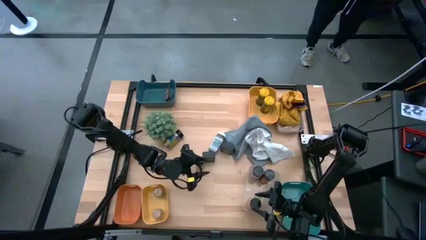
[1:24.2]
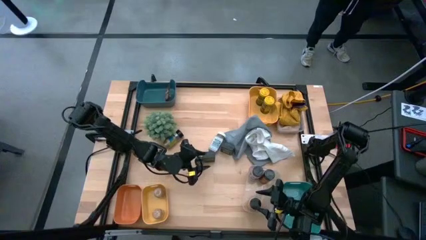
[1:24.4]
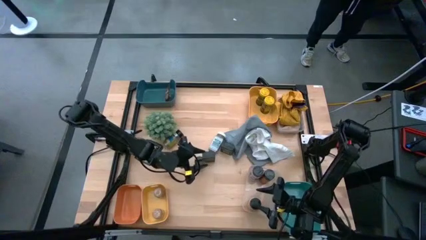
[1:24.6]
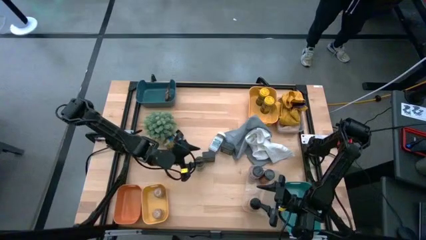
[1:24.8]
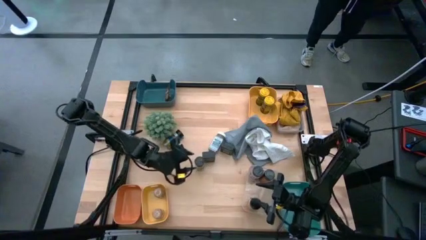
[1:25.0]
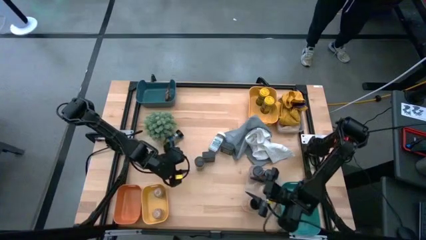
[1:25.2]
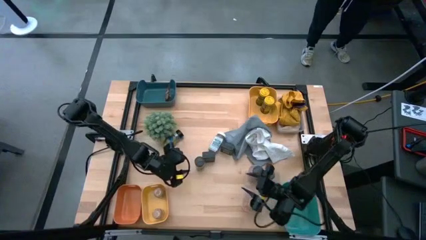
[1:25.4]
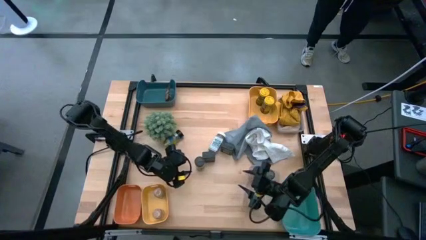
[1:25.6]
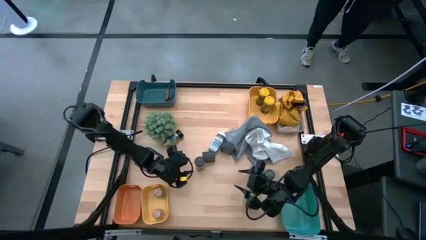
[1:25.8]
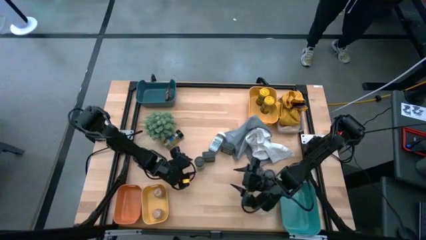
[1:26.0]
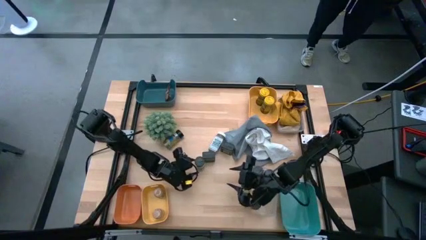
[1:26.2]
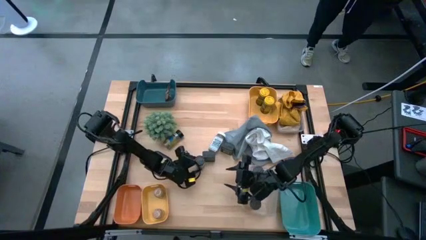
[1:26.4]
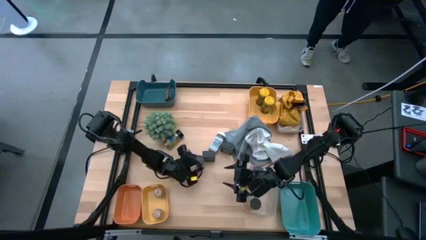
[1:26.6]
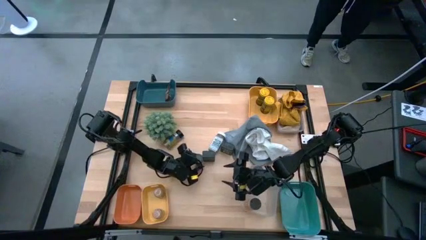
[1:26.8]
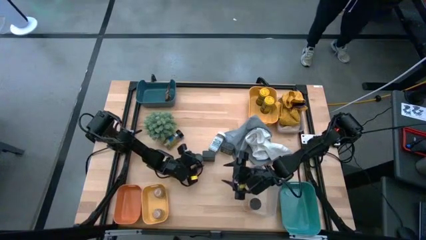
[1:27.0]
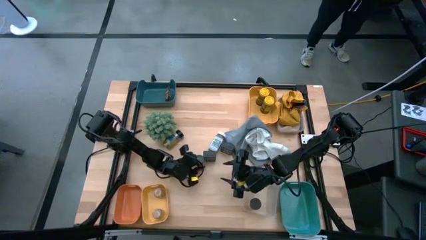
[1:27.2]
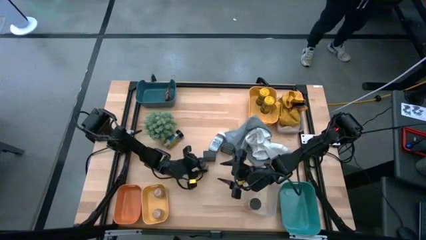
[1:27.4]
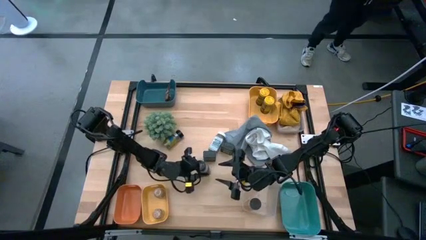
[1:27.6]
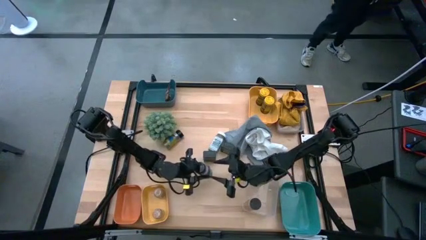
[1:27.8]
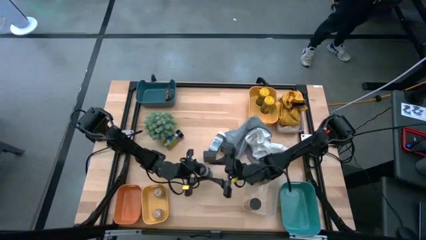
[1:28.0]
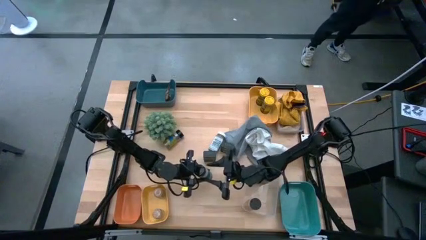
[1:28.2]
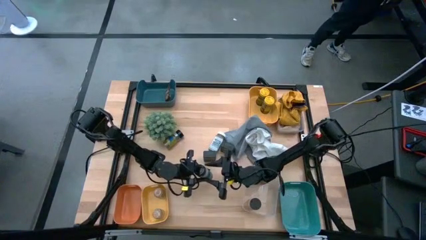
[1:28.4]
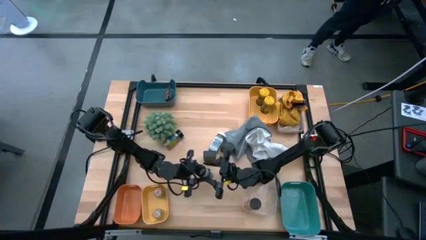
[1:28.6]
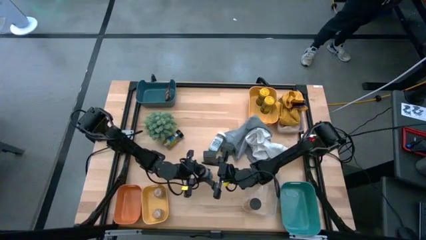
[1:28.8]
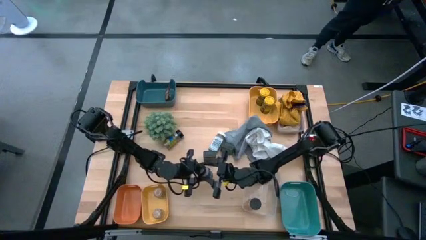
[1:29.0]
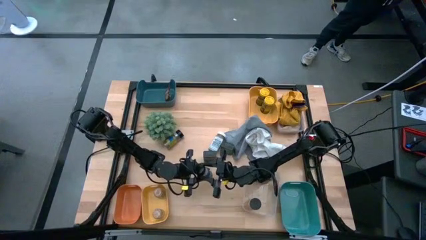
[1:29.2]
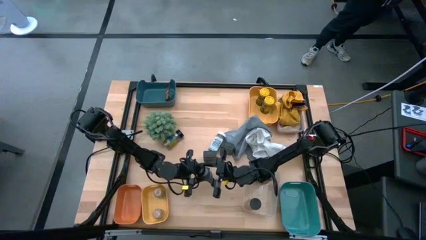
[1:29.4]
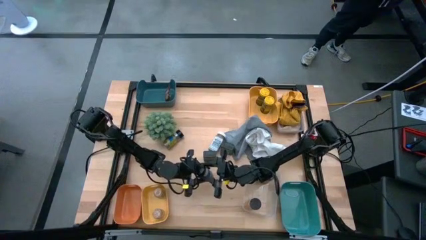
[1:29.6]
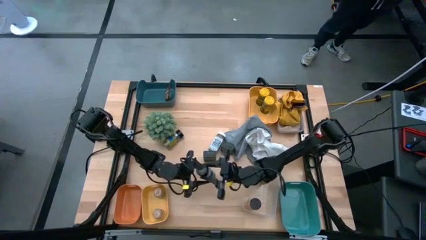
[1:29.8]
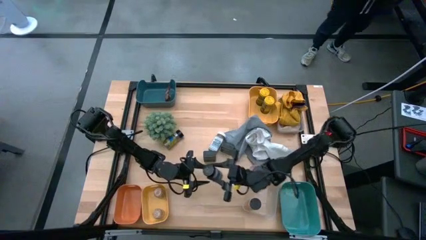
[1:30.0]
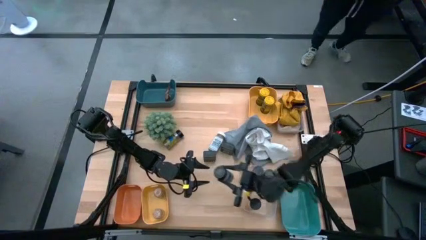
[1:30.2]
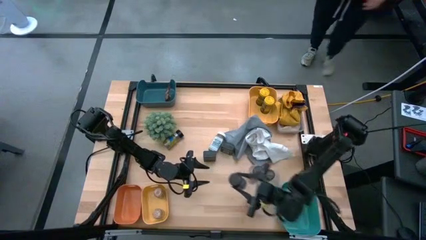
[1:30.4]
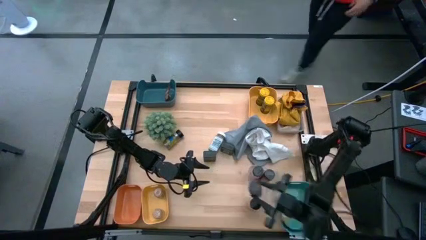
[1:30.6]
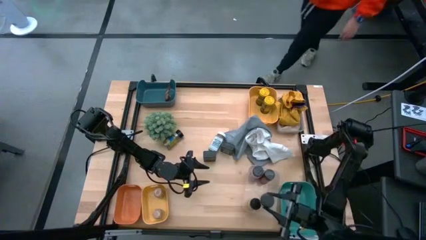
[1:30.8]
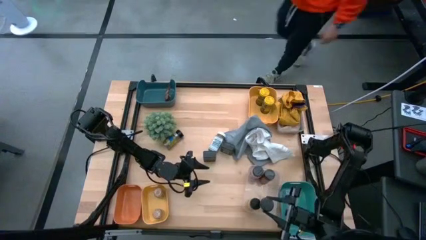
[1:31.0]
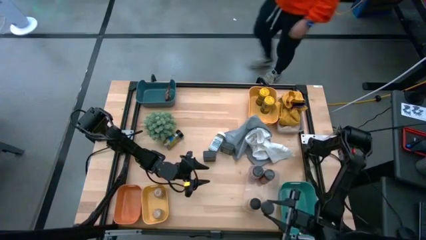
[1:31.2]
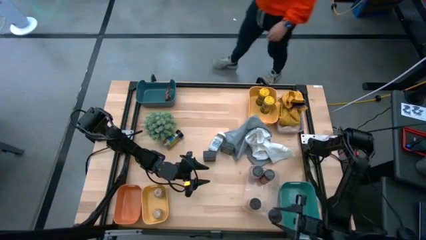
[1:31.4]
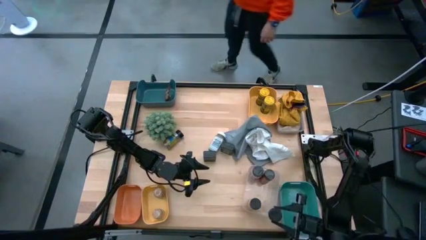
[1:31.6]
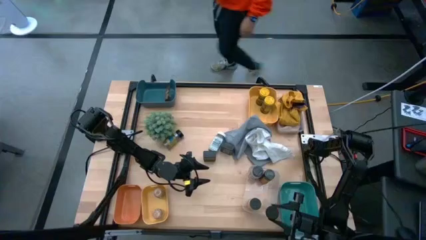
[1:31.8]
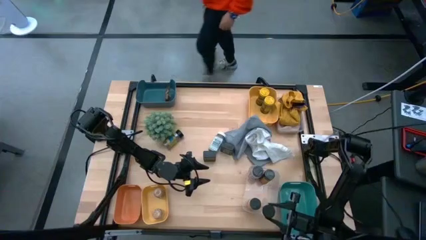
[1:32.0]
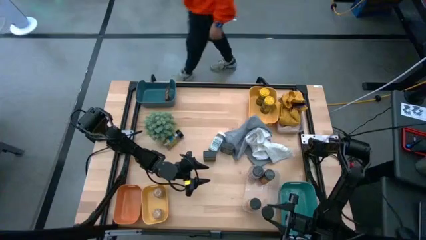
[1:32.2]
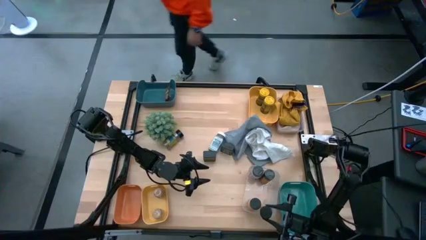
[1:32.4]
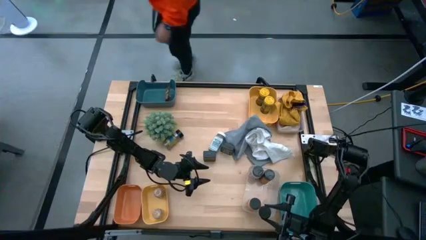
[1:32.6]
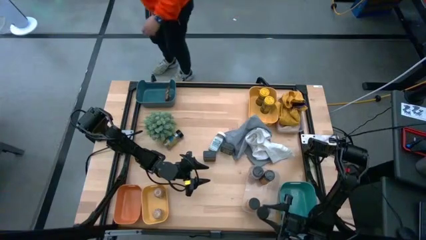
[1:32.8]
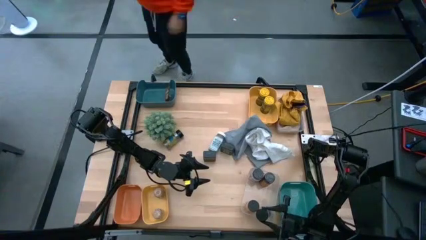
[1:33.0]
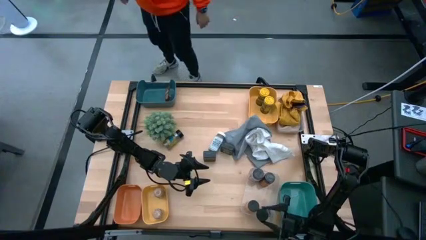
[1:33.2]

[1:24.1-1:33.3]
Task: Sort spices by type
Put the black seasoning bottle into the transparent bin

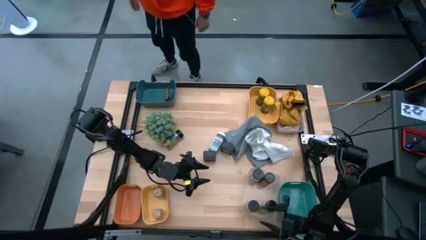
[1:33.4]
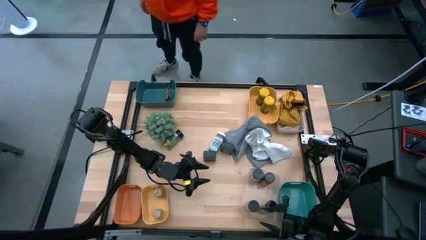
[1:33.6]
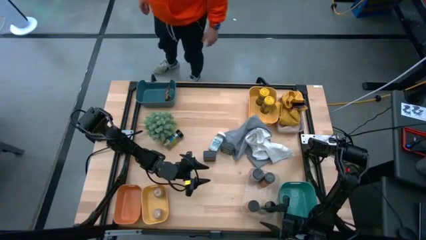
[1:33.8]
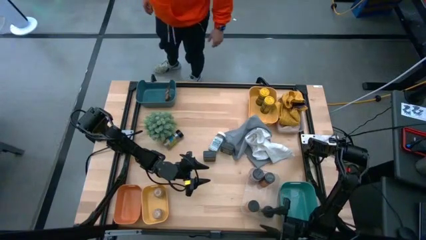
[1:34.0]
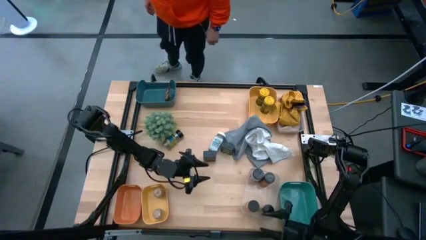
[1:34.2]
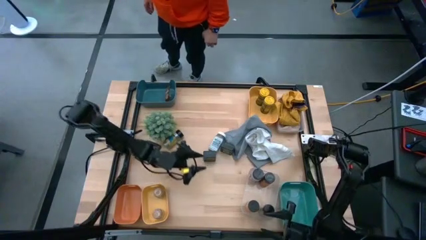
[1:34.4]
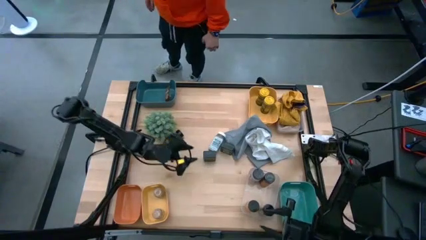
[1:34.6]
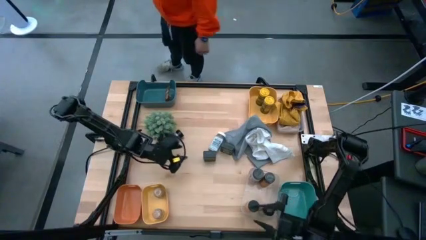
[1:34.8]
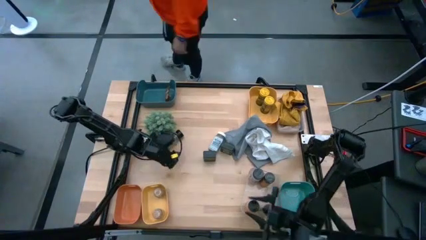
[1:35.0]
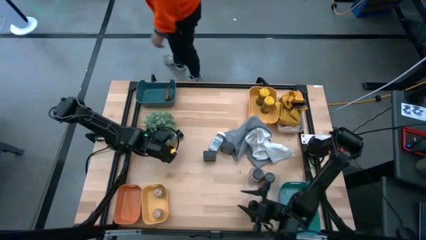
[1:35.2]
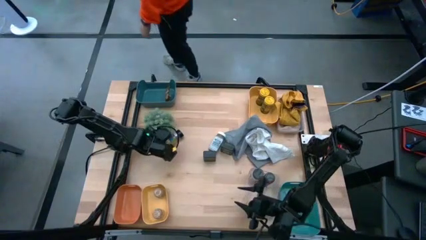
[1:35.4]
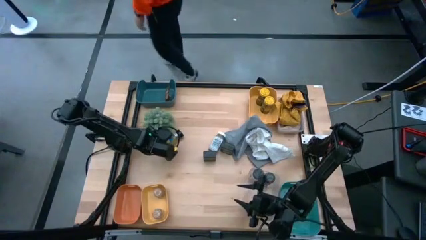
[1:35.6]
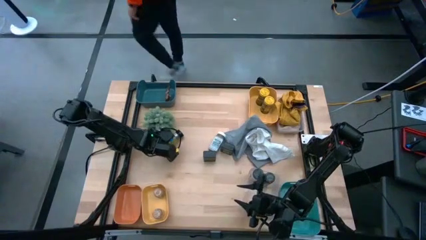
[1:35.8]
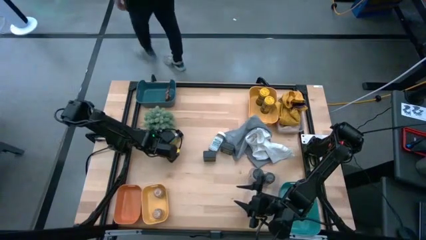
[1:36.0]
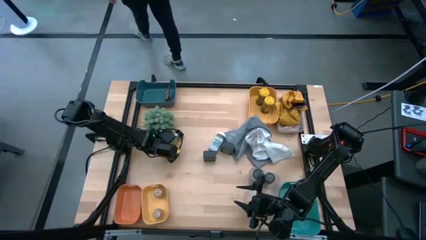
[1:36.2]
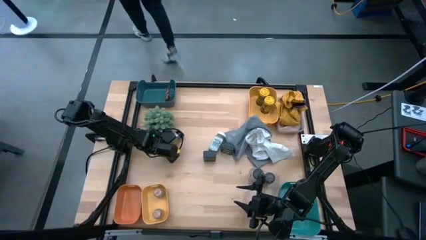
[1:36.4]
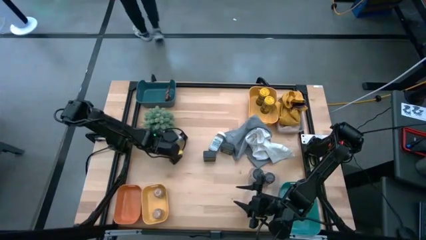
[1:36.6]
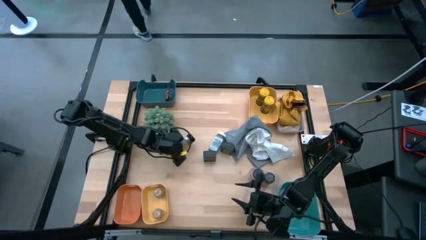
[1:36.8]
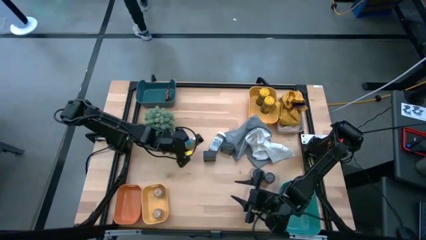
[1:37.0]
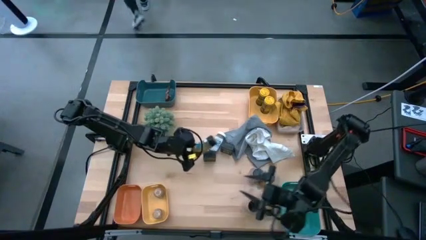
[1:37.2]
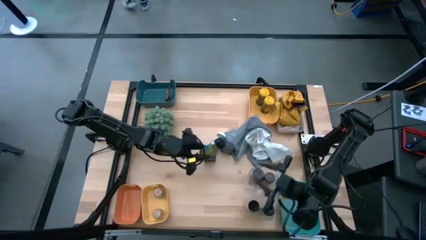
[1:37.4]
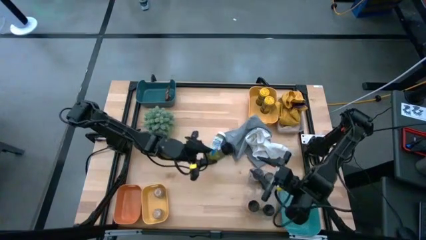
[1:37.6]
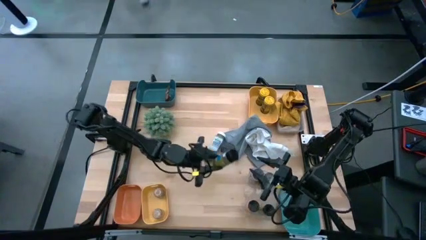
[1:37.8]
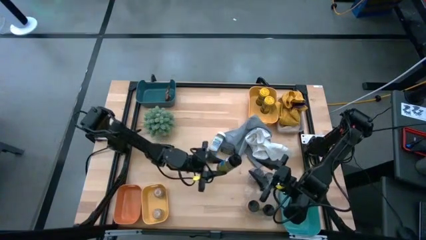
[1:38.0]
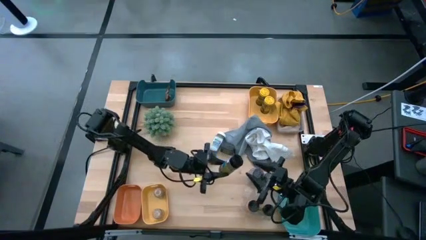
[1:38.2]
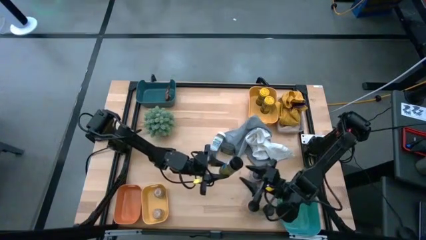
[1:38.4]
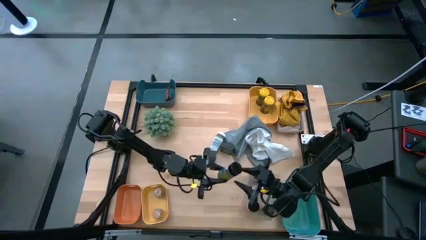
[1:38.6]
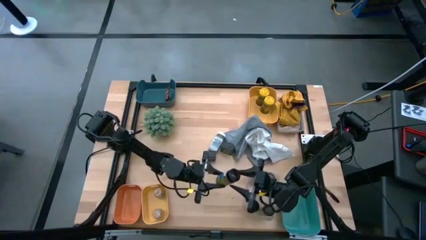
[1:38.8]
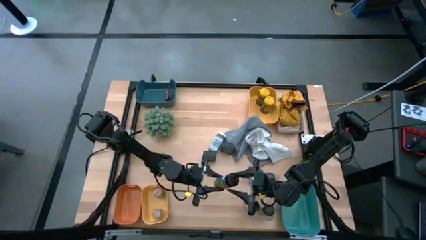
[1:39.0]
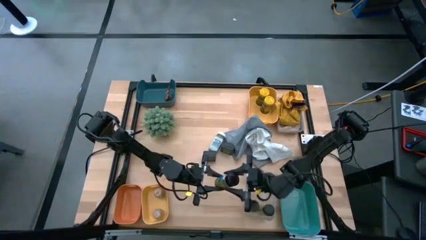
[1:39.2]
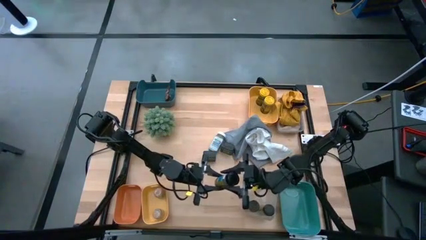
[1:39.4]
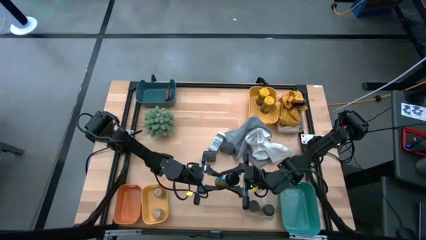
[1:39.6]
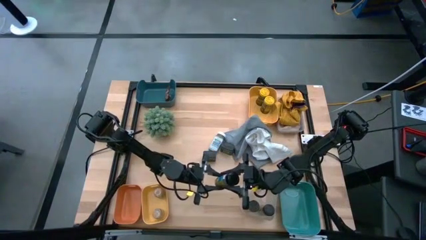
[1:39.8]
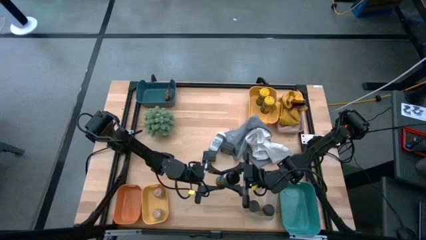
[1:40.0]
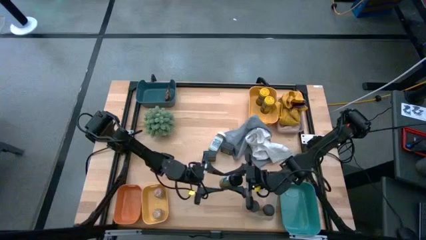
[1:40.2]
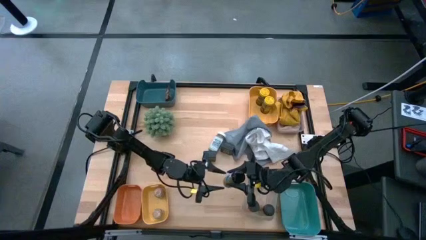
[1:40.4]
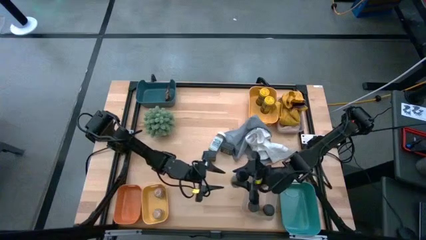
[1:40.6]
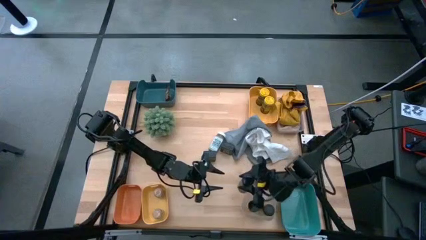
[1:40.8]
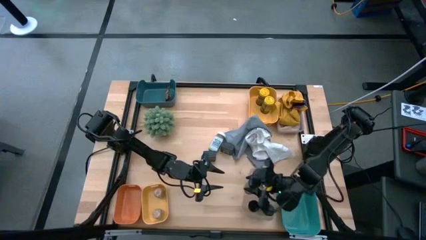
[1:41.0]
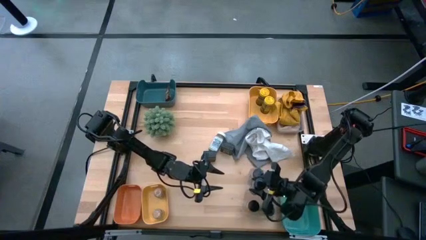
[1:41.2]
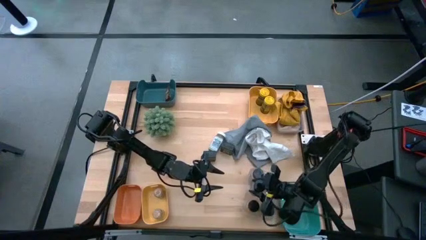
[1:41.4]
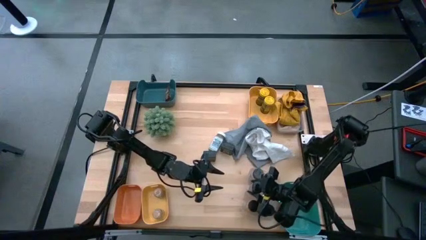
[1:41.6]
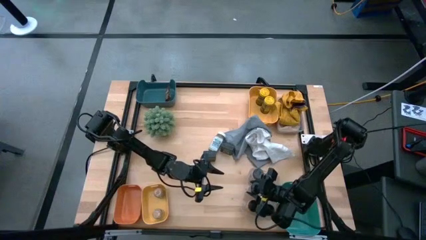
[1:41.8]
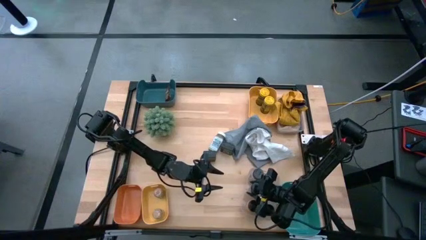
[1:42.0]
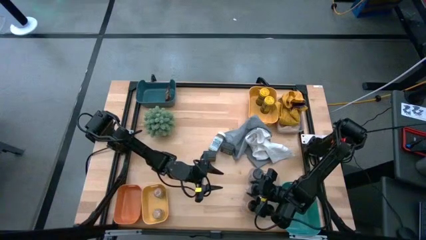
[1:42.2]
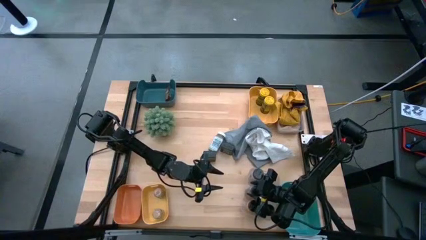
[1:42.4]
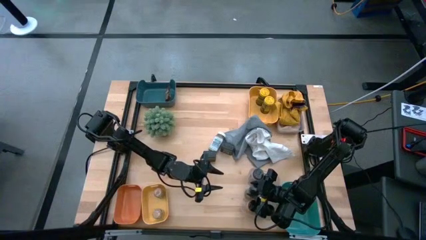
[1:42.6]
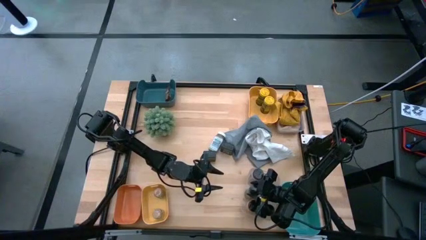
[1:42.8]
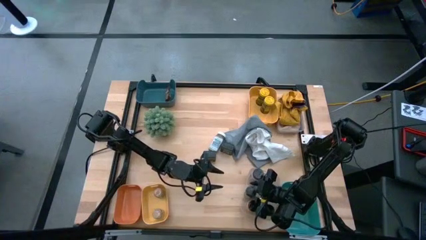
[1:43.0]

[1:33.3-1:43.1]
Put the black seasoning bottle into the transparent bin
